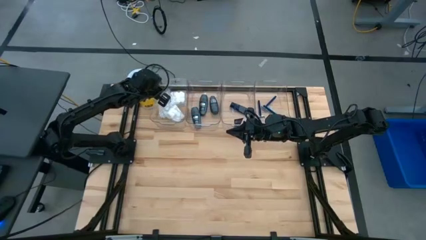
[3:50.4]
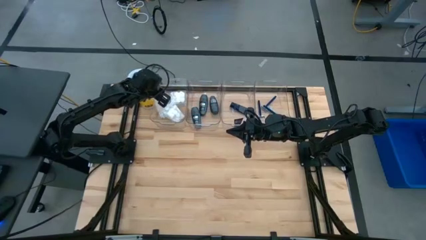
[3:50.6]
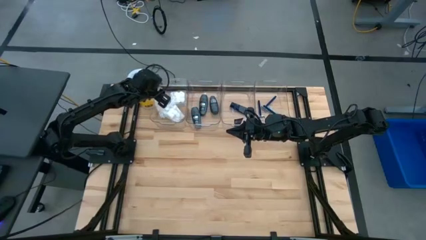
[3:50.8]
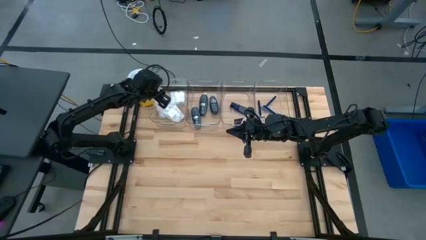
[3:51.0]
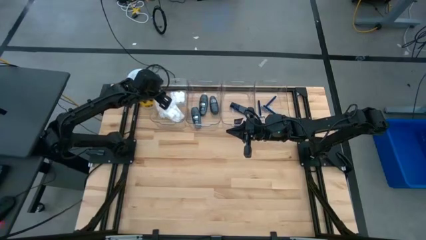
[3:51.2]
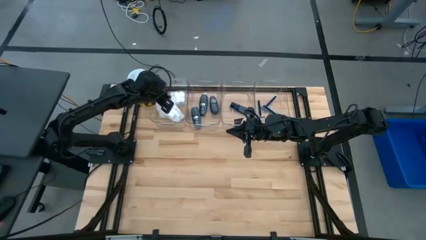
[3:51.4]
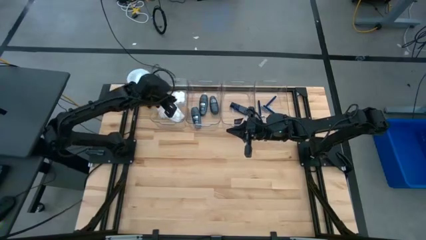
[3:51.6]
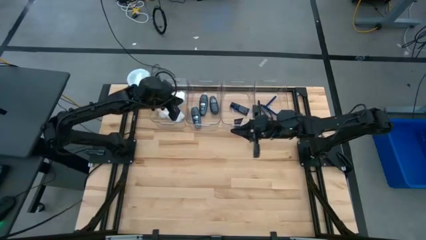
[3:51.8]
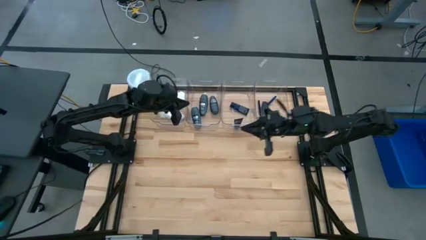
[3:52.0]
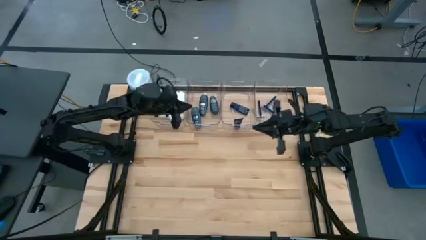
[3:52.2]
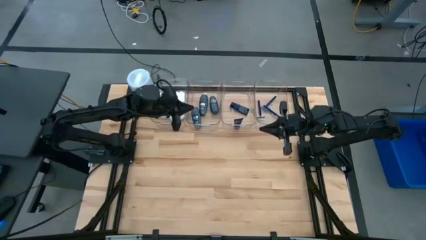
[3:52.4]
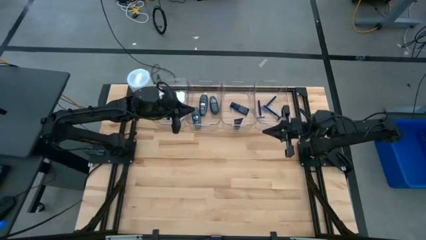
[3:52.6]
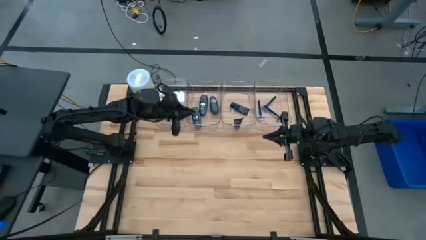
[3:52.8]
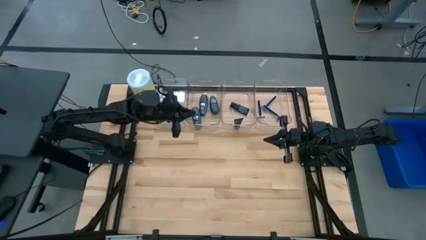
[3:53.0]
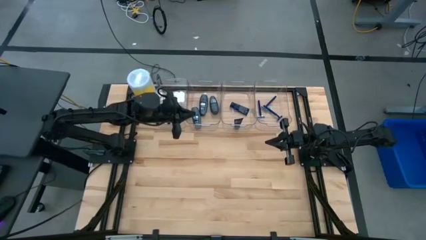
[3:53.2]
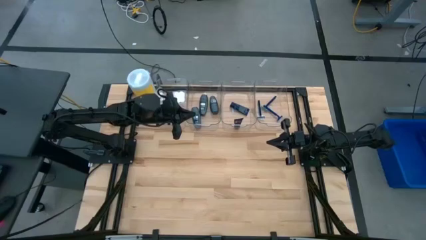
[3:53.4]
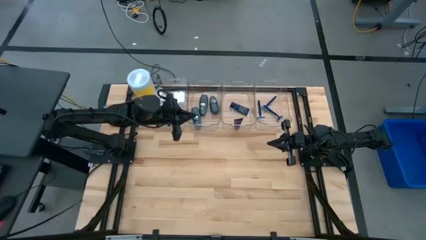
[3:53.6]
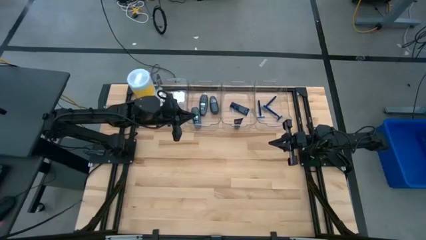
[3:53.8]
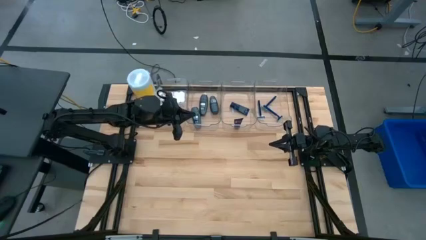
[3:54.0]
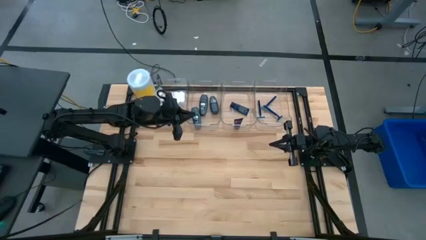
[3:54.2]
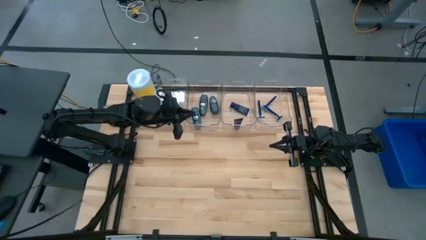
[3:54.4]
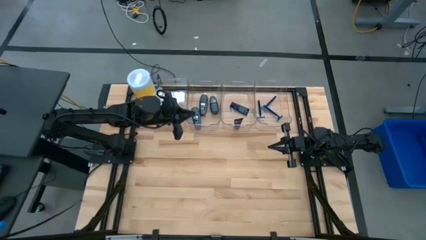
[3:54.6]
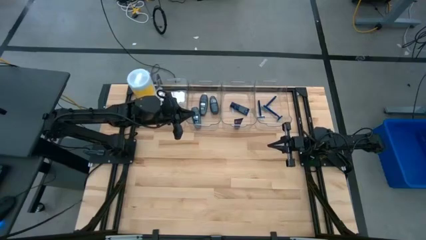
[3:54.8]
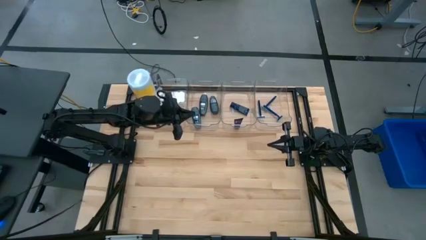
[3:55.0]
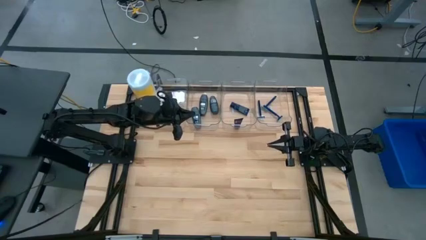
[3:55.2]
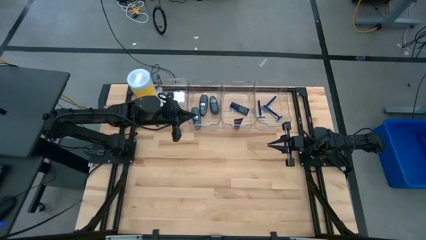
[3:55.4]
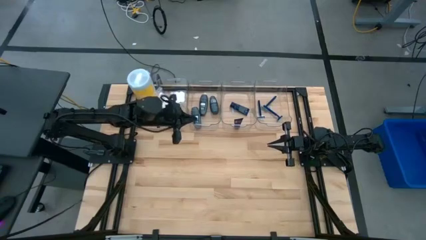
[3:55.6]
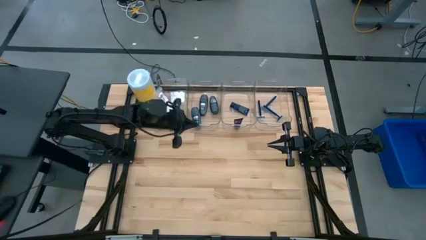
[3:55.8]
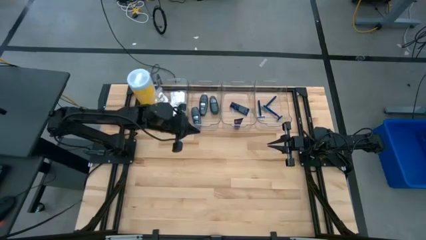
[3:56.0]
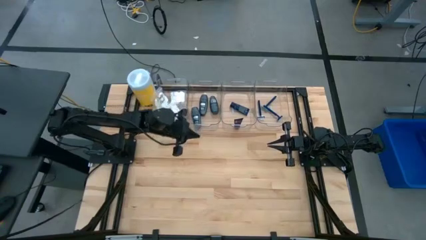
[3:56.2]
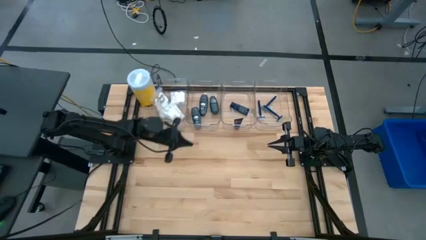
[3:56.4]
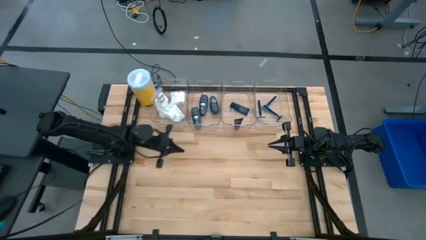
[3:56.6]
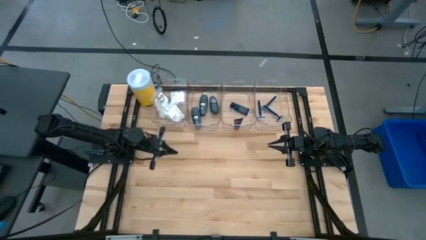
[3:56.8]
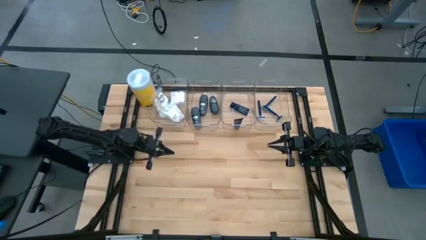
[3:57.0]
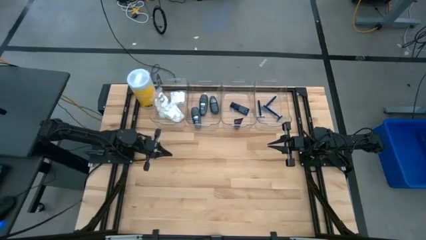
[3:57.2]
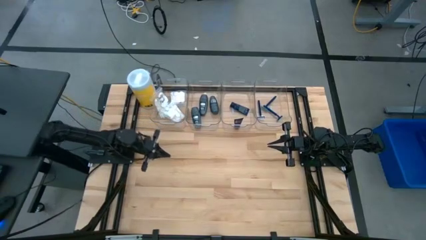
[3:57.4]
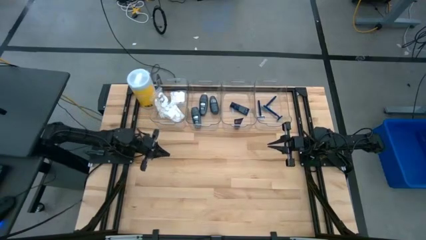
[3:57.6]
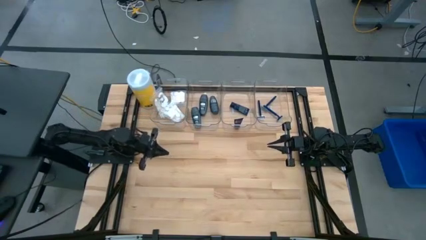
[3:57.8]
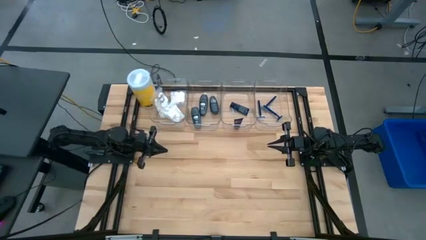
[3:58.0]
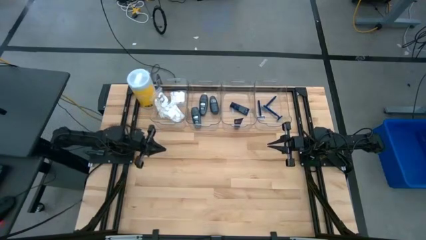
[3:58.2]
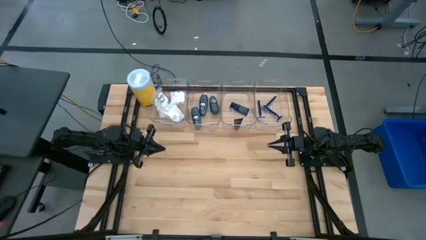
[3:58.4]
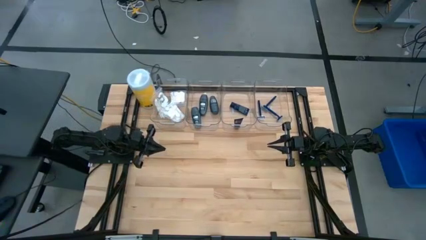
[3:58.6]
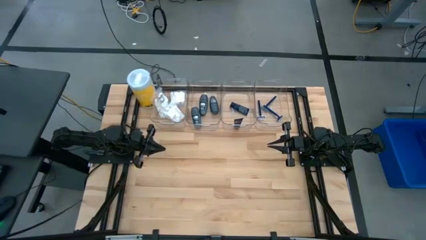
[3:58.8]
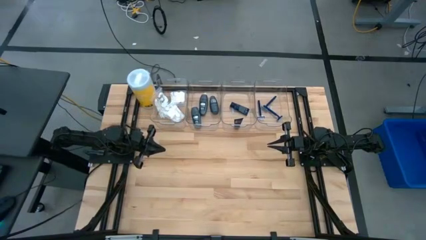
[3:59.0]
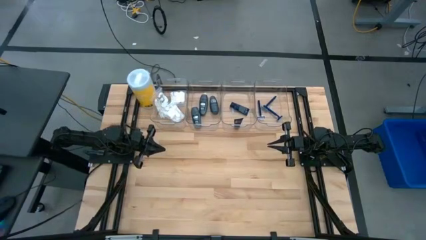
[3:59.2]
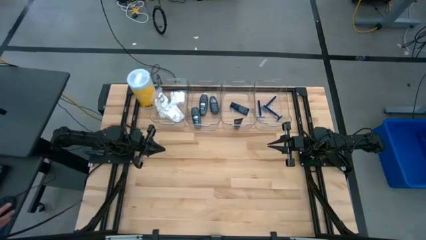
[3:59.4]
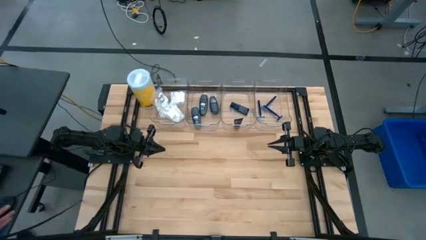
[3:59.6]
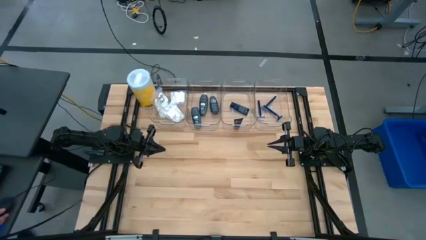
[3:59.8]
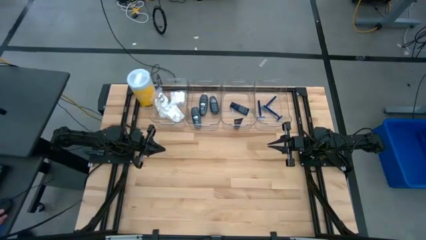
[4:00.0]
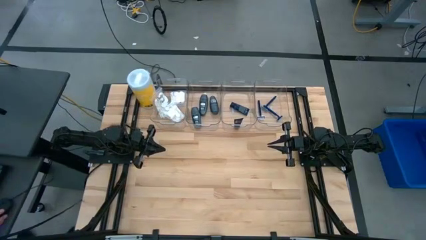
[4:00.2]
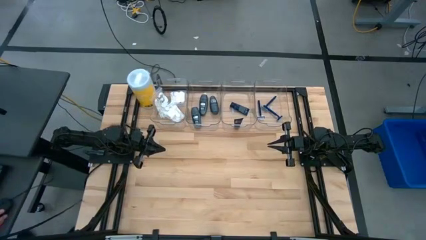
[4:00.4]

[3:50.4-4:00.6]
Task: Pick & Place Travel size toiletries
Return to Home Position

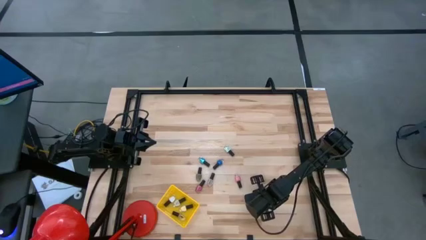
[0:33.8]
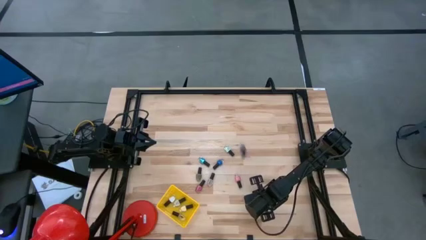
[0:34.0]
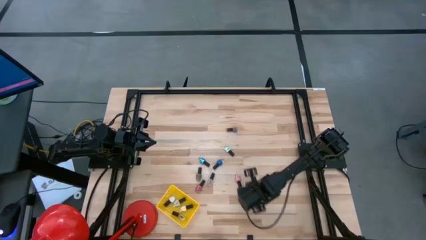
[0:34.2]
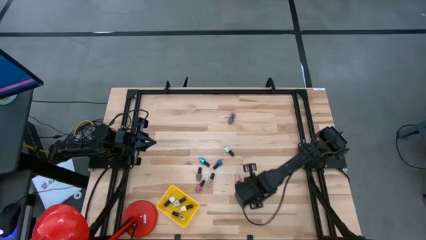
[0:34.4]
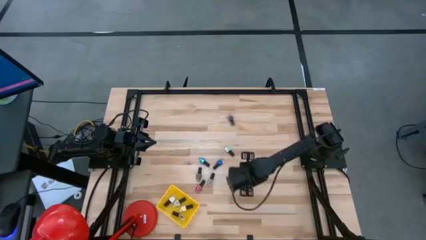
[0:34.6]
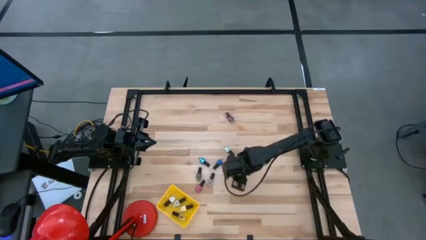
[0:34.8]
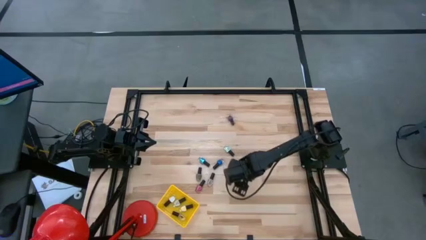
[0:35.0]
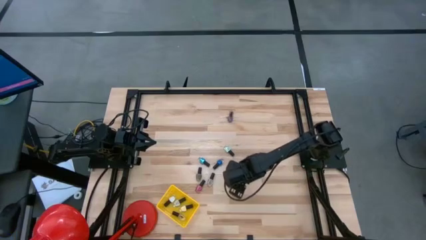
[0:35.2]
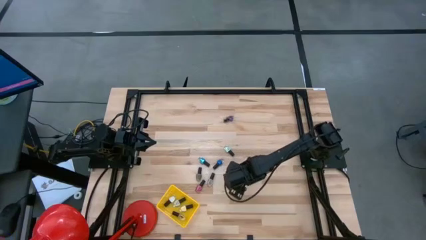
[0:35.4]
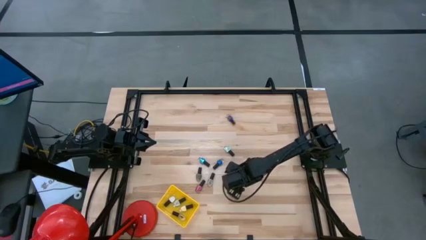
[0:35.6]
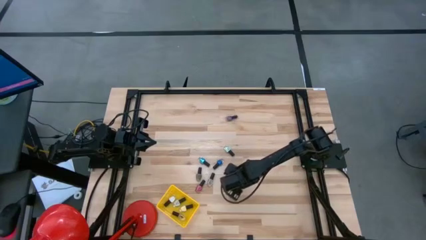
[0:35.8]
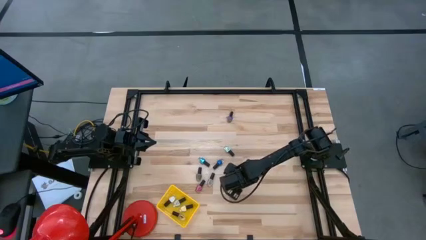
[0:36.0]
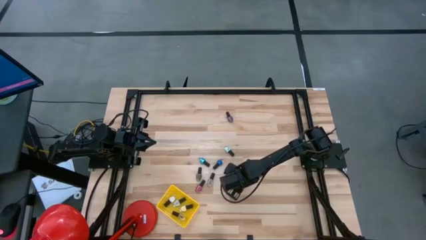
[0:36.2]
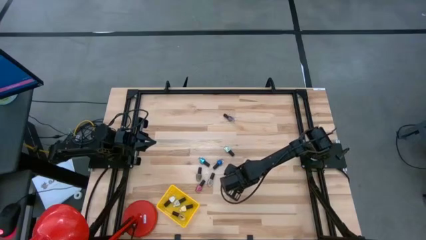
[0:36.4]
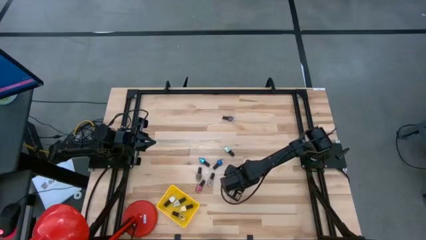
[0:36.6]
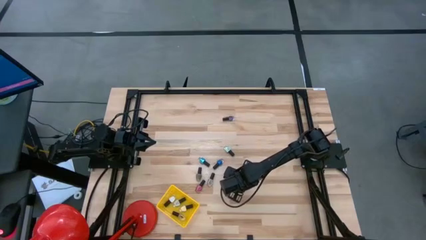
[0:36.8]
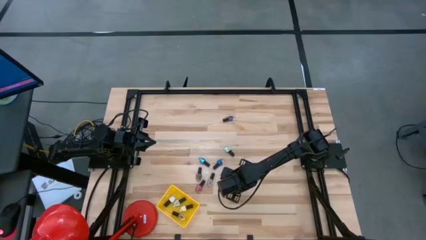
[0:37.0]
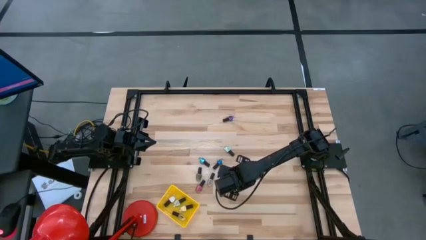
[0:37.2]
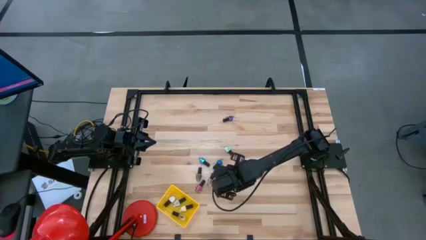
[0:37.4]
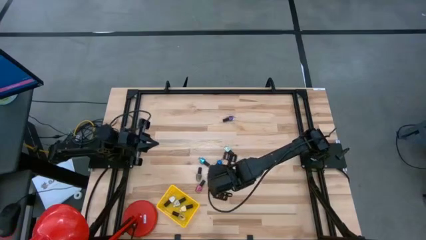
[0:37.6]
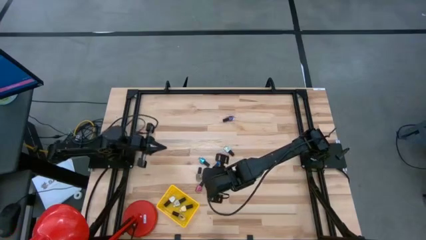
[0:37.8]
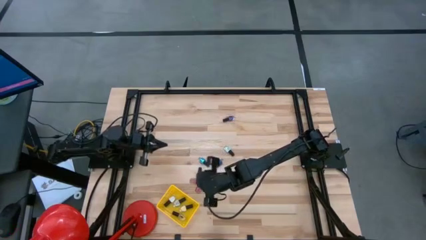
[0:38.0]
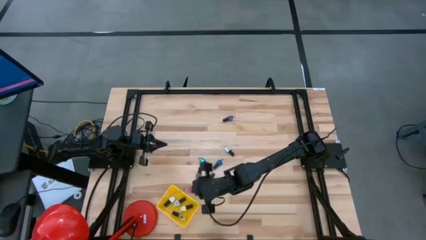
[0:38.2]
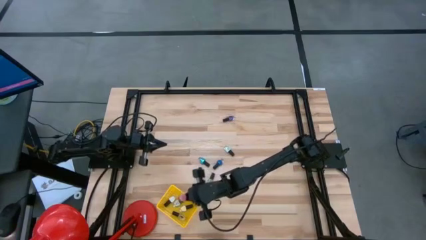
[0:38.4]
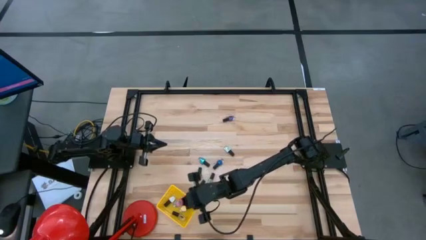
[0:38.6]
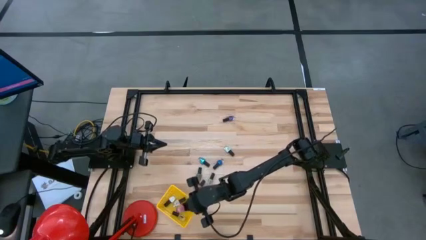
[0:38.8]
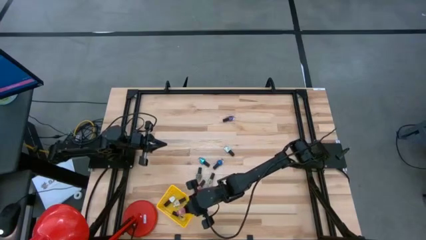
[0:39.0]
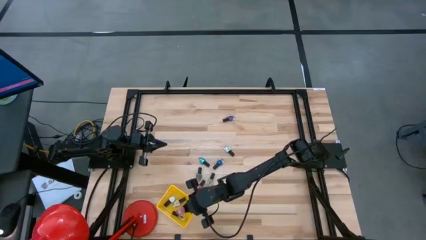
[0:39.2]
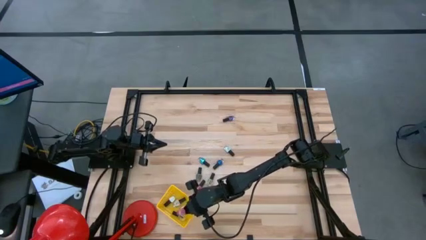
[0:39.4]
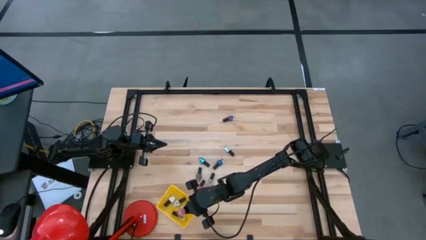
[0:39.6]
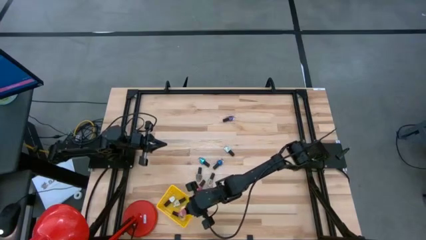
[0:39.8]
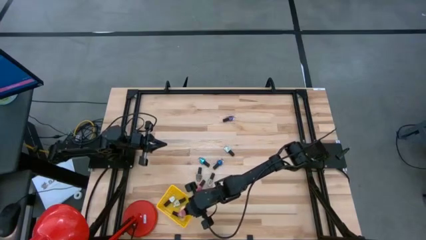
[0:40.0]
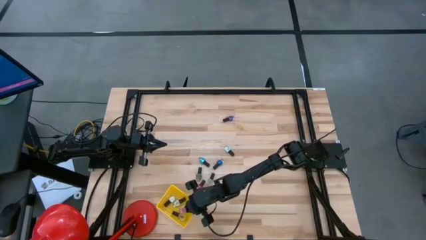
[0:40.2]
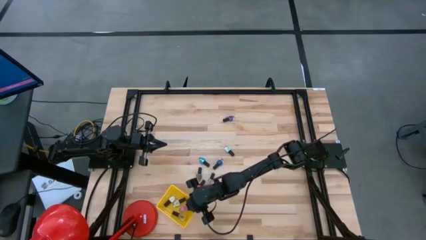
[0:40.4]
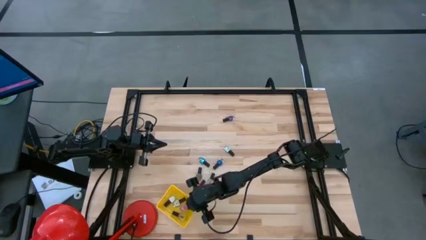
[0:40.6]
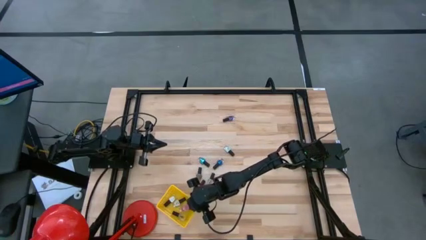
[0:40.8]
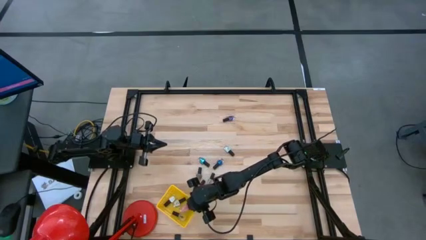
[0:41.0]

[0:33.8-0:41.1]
Task: Pick & Place Nail Polish
Put the pink nail polish into the yellow basket
